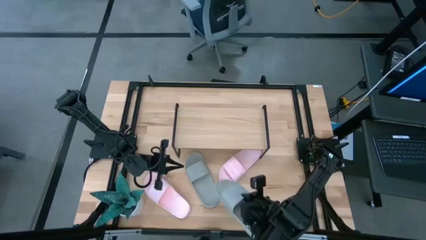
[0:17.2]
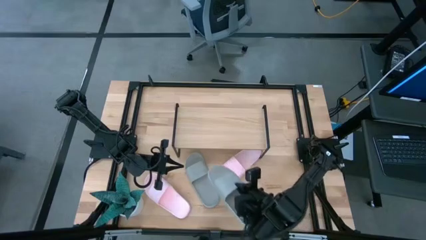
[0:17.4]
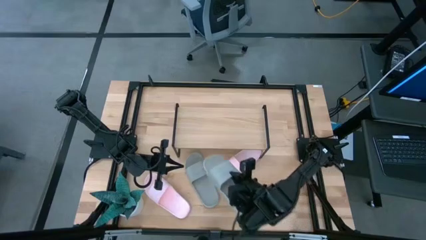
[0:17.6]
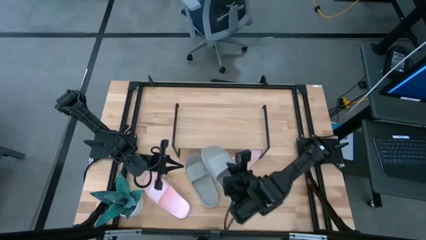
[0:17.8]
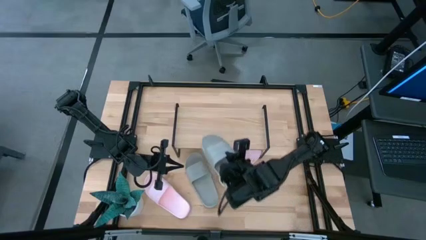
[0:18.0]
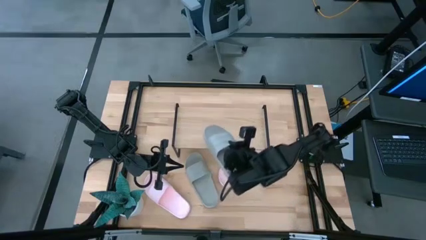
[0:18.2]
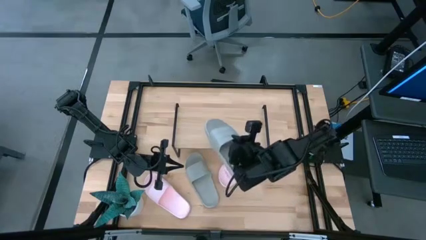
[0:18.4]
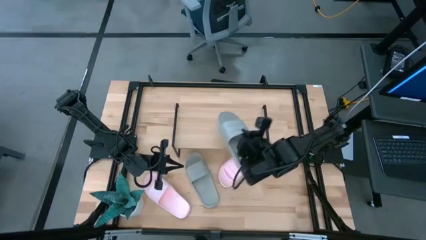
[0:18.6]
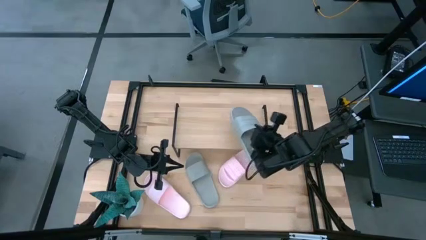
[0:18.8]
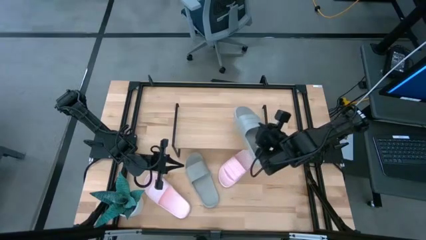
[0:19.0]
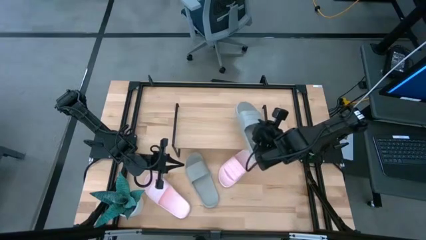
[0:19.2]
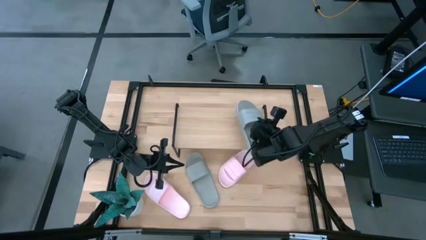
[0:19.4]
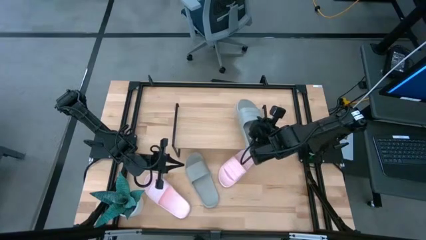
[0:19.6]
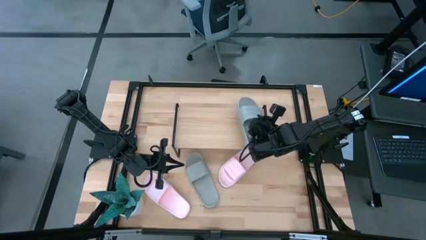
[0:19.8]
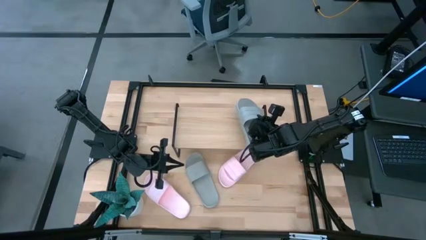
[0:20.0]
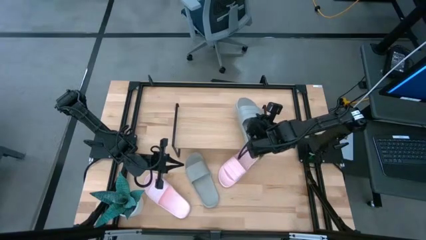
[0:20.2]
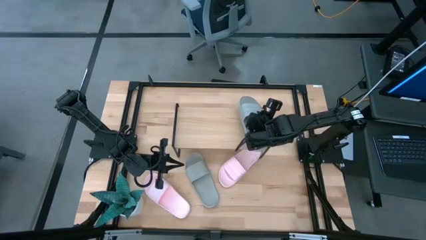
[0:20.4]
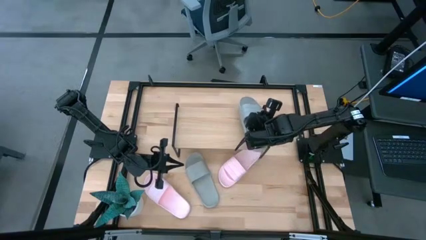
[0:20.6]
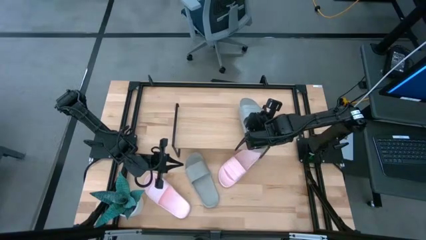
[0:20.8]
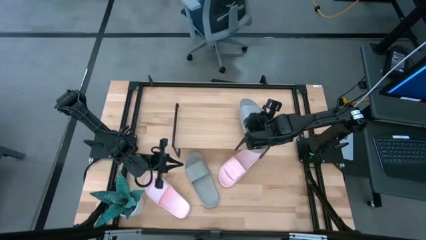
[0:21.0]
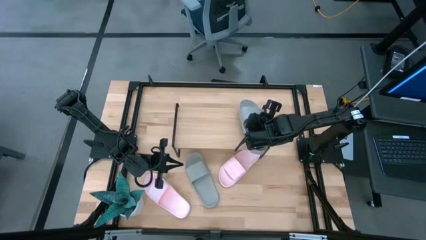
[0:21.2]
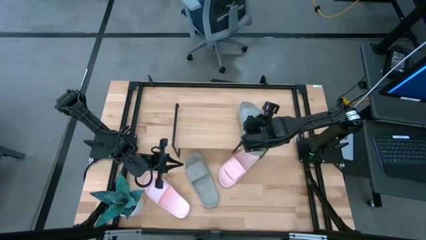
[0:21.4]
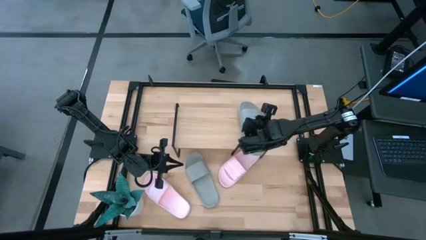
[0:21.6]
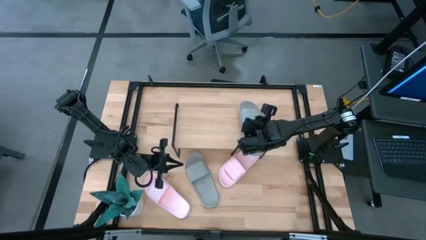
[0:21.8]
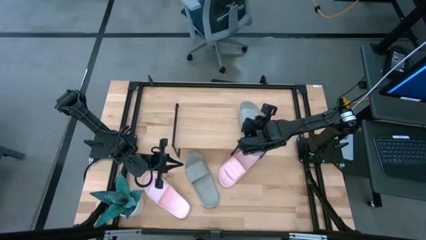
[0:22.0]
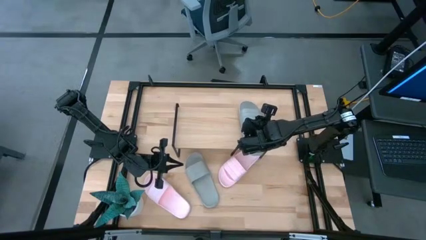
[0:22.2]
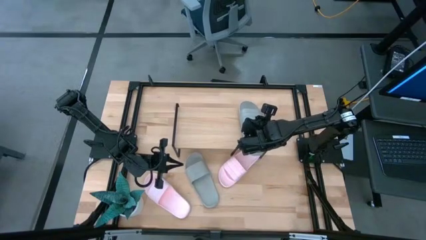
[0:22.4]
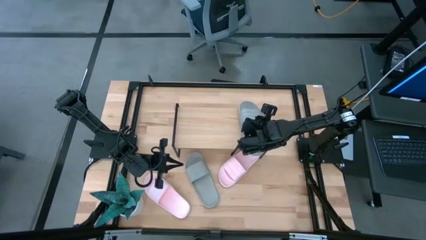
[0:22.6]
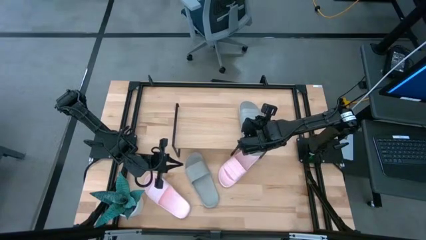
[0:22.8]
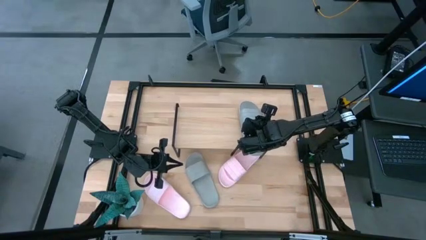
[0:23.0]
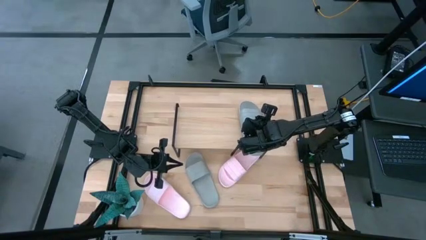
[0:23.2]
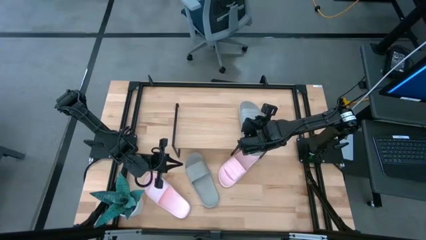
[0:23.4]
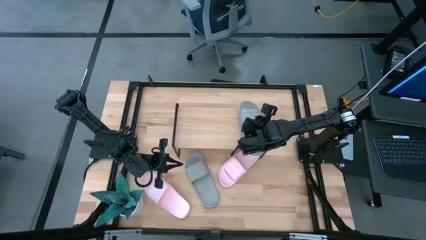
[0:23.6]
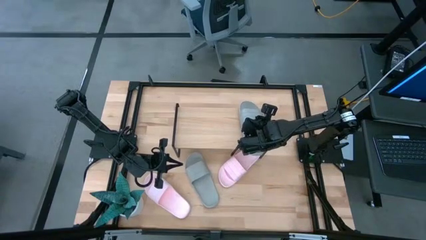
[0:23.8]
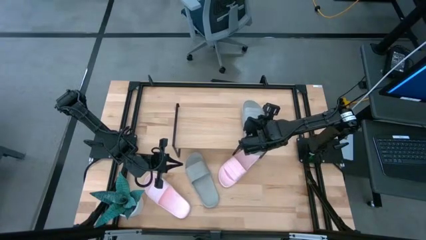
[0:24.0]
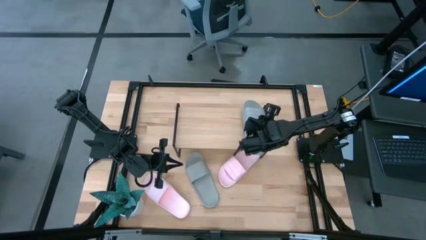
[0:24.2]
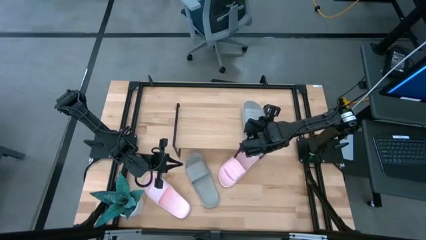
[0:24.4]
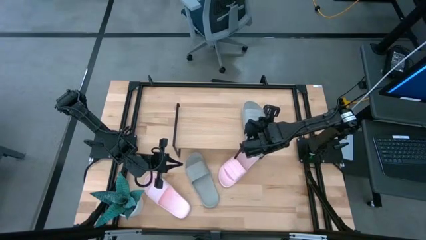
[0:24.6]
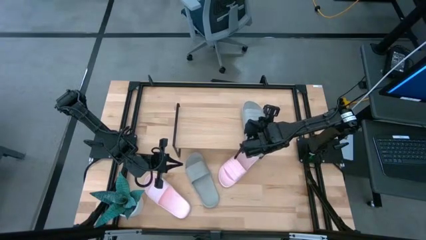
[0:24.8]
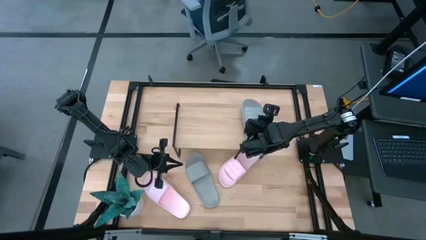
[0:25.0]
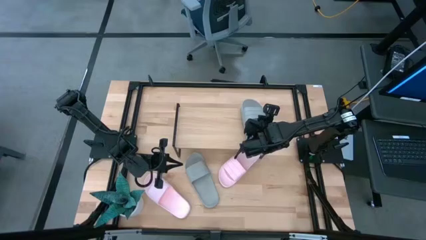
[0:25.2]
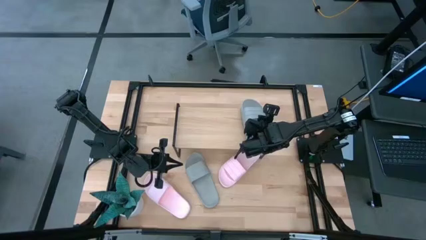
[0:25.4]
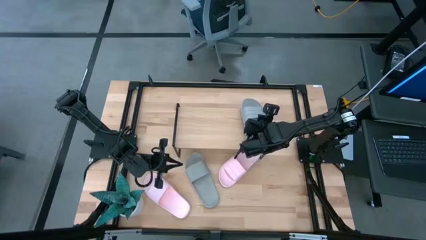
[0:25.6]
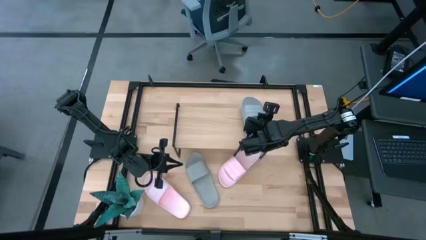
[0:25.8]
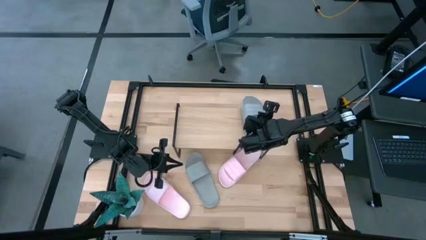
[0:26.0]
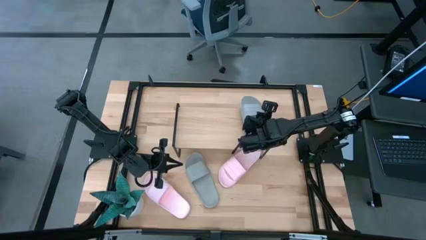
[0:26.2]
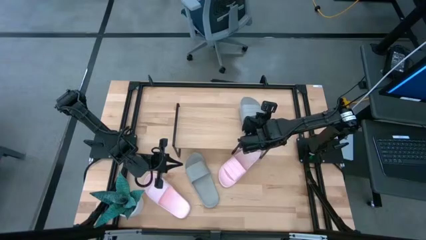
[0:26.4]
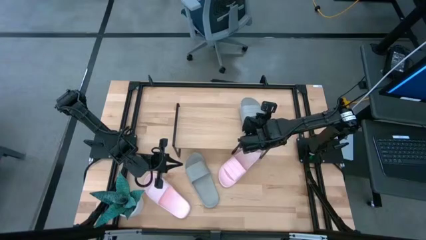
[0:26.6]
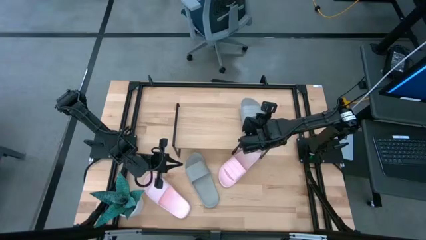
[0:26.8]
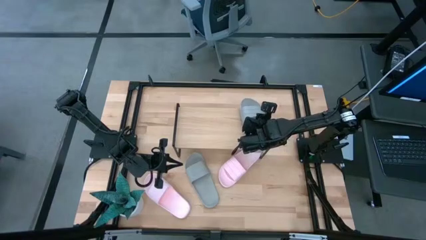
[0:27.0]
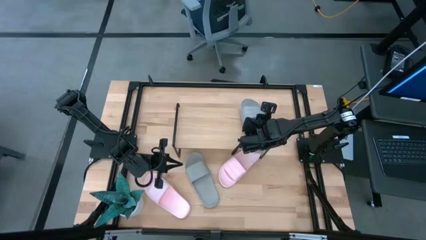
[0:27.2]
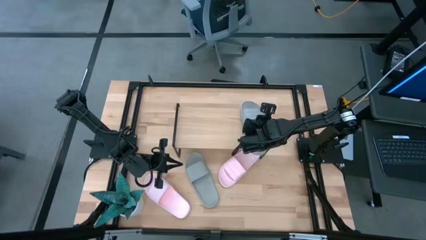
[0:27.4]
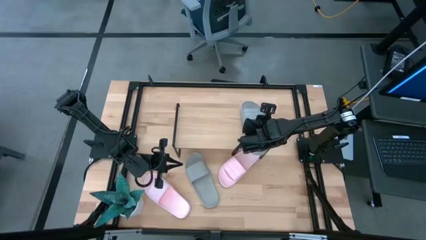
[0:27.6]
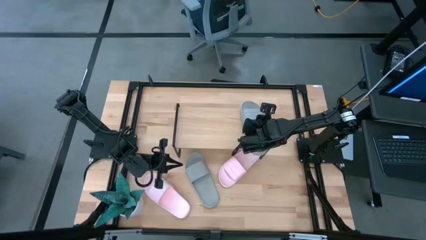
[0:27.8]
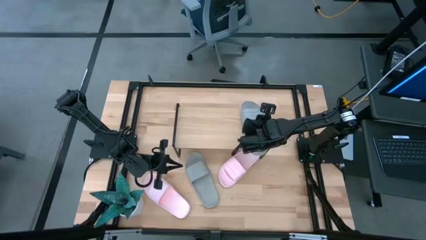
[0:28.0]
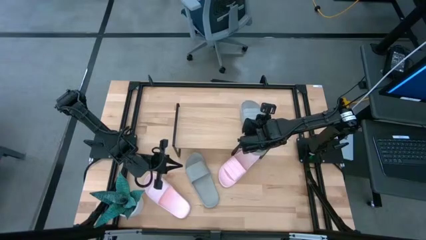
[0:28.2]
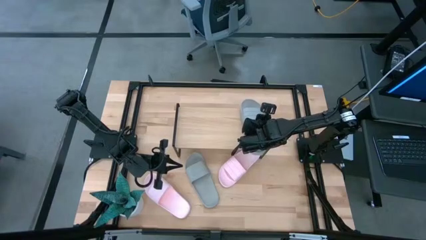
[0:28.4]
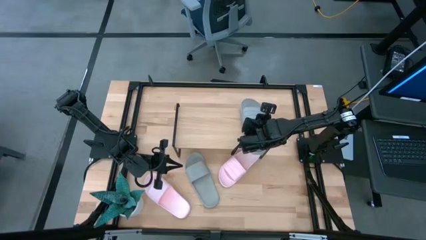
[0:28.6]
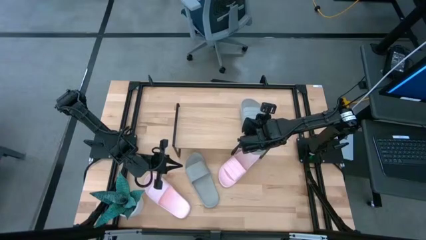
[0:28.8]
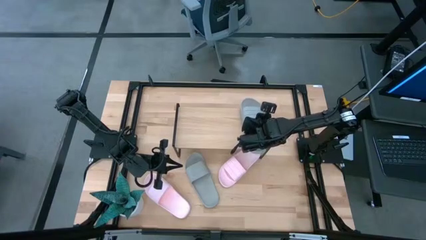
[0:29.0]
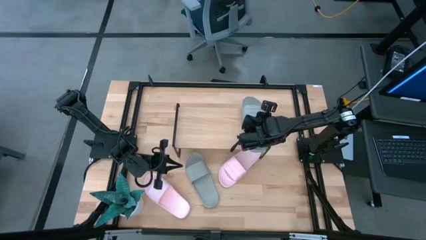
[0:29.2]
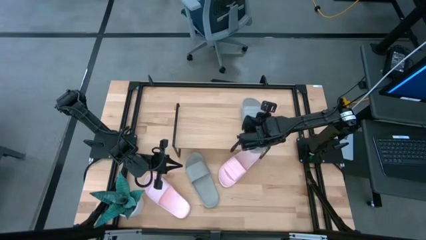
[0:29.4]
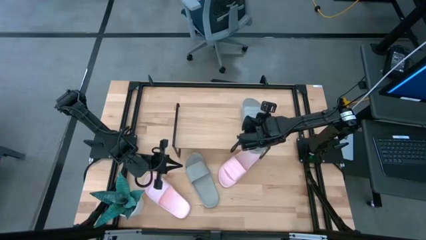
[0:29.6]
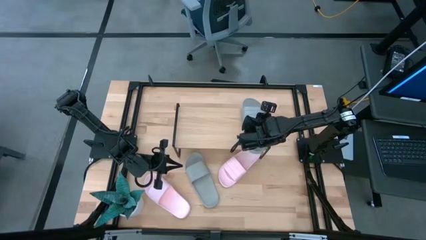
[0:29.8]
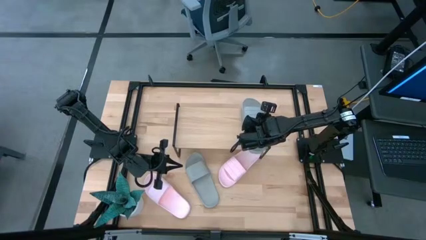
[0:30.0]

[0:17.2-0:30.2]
Task: Pick and place slides into the shelf
Put the right gray slide on the shelf

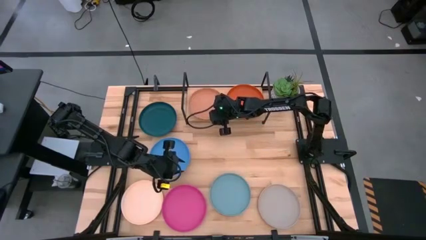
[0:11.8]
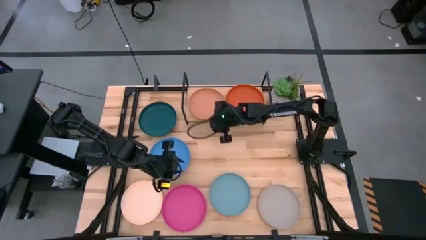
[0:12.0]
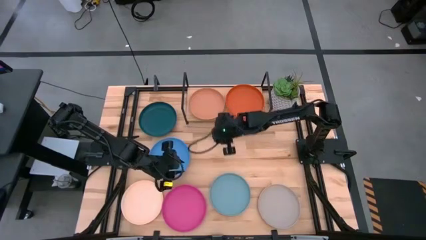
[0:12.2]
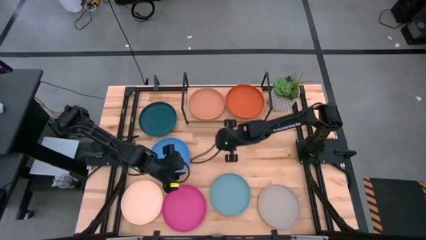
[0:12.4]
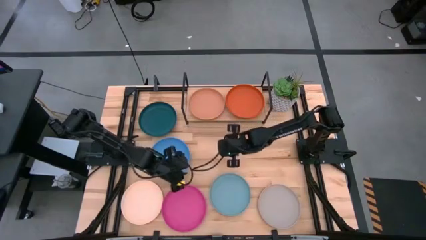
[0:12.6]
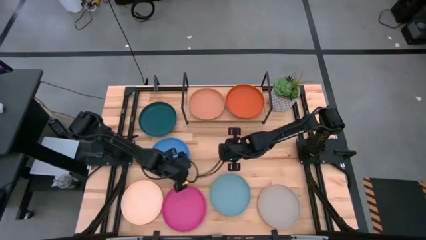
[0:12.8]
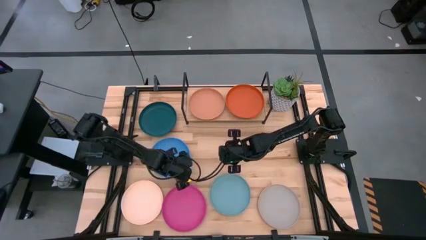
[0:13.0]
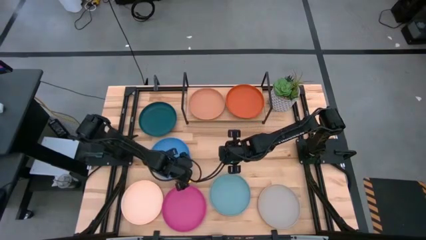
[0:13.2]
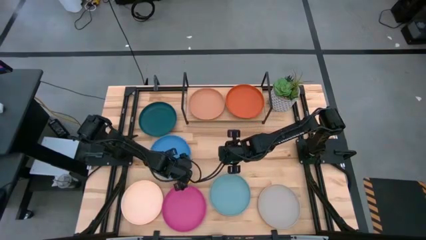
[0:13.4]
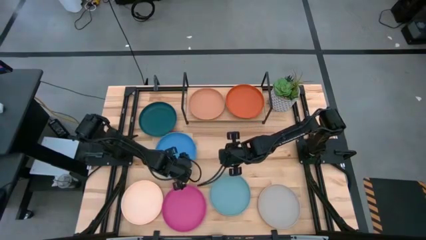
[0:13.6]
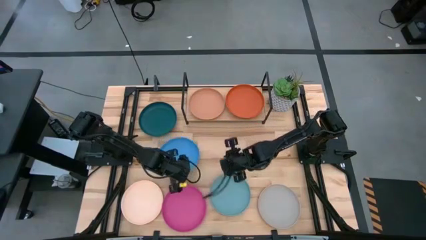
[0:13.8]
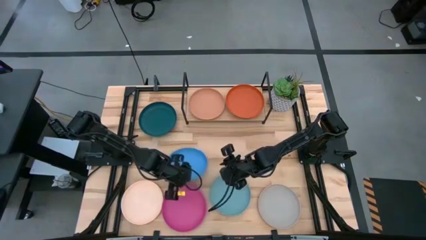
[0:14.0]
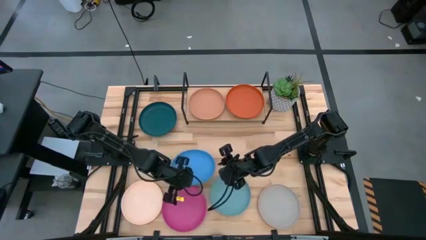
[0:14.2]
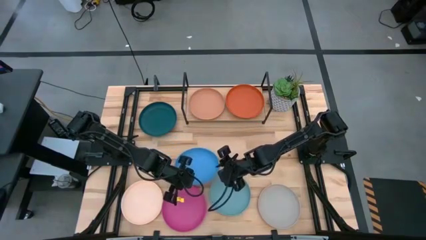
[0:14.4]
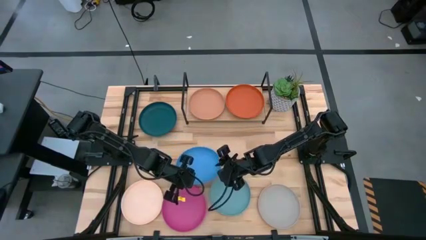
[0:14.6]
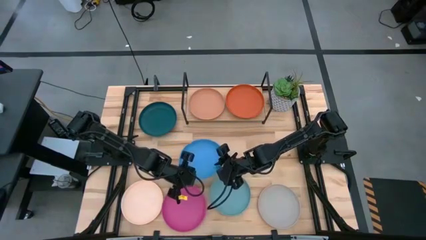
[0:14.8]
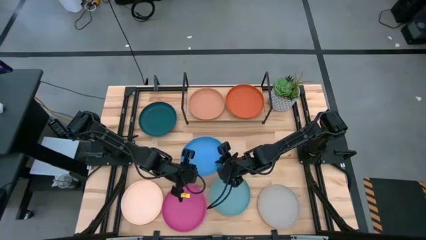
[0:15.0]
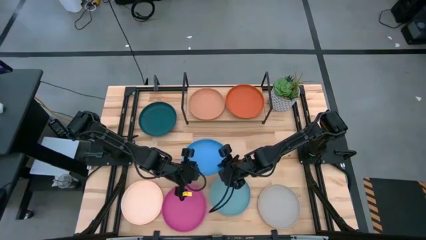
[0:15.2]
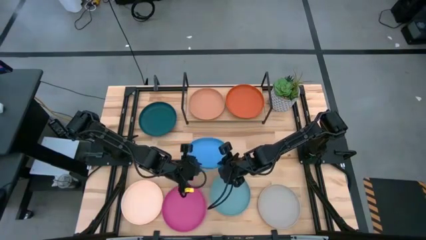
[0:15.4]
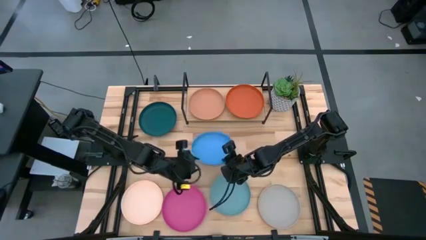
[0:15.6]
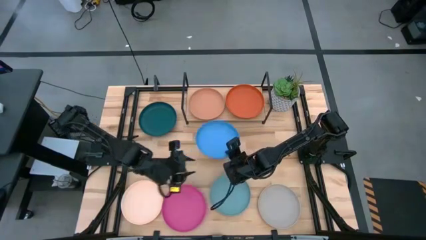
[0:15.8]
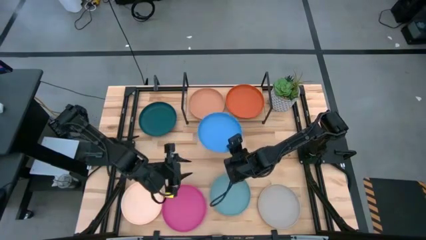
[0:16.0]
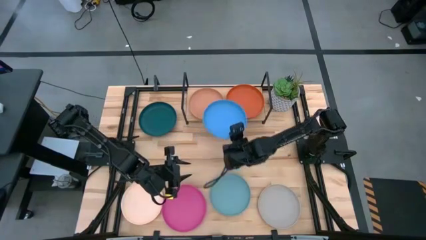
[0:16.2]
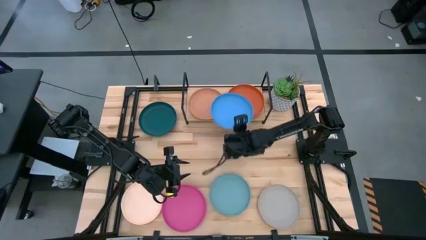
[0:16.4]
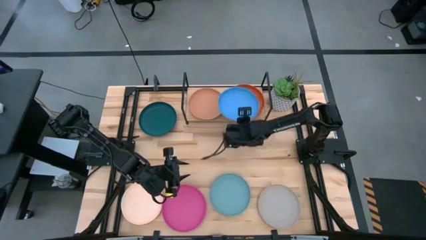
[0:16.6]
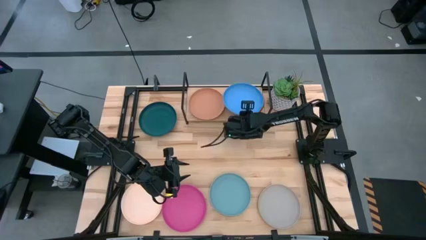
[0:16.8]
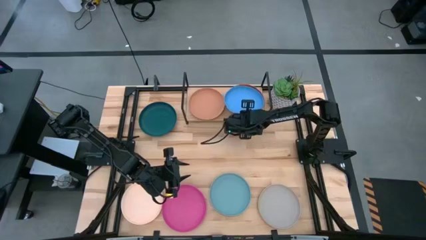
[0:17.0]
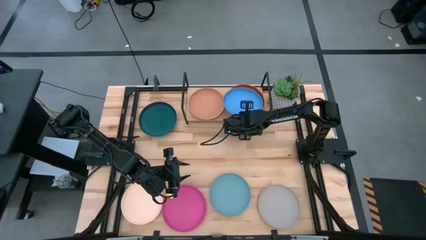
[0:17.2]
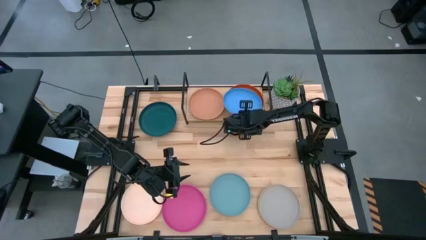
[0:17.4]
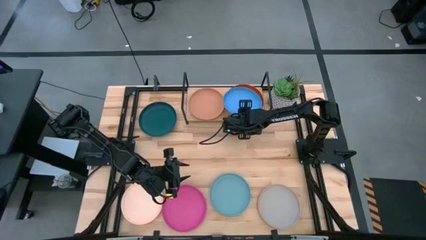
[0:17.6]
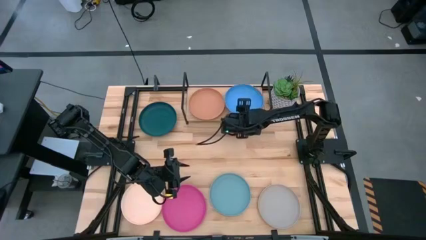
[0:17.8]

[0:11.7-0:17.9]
Task: Place and stack plates onto a shelf
Stack the dark blue plate on top of the orange plate on the shelf
